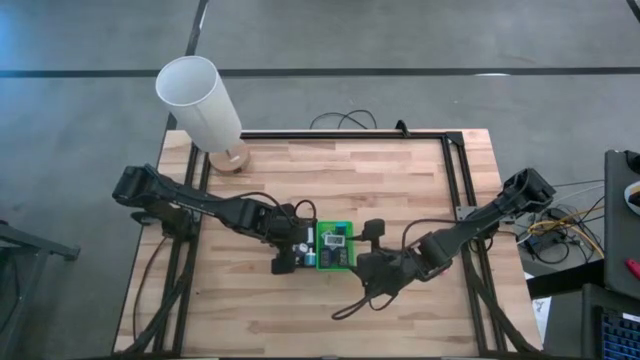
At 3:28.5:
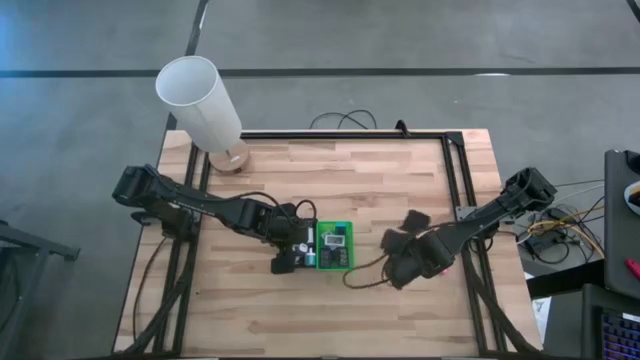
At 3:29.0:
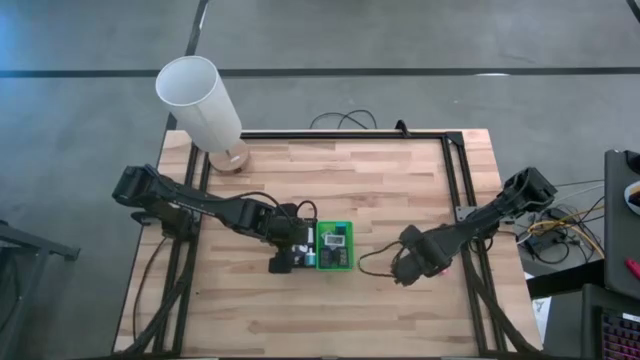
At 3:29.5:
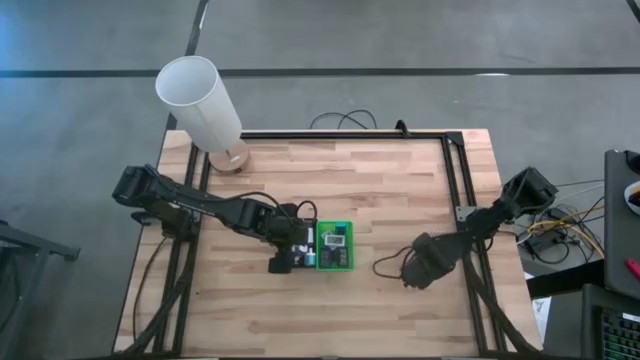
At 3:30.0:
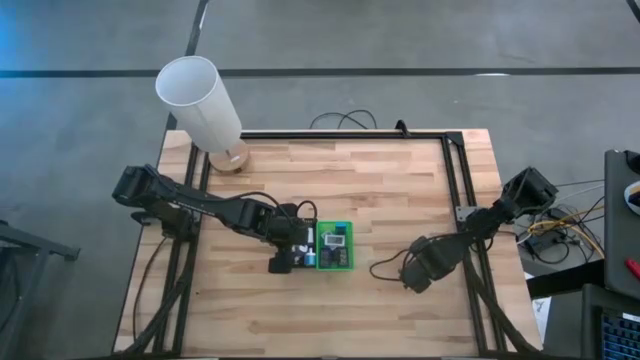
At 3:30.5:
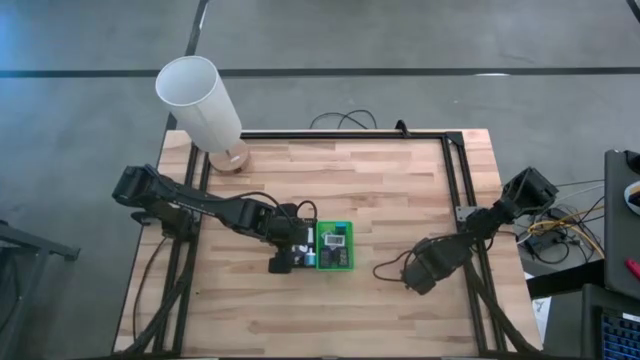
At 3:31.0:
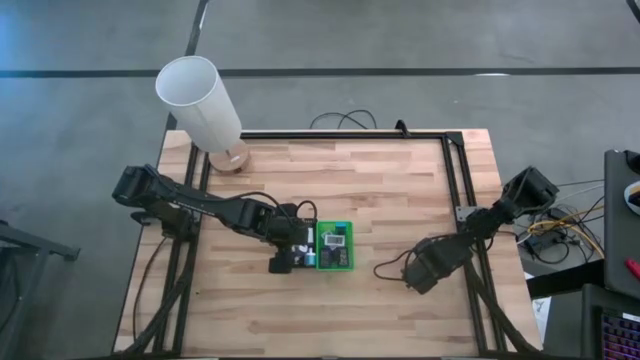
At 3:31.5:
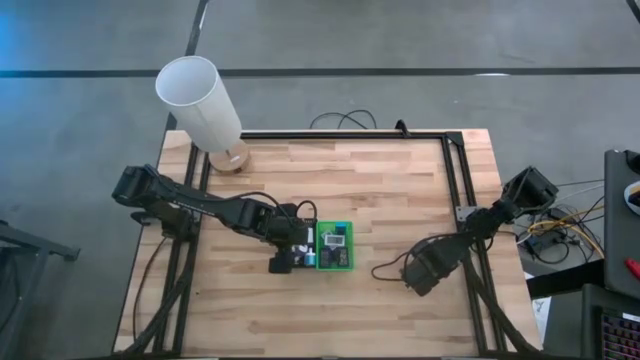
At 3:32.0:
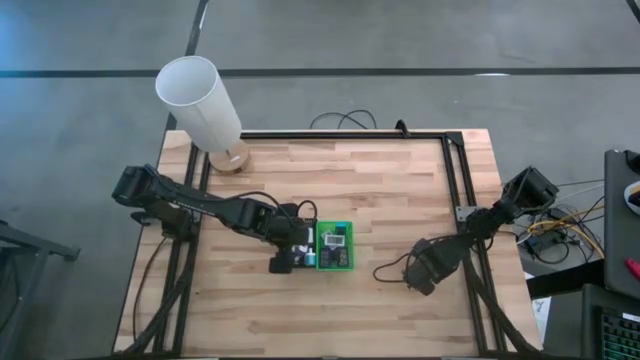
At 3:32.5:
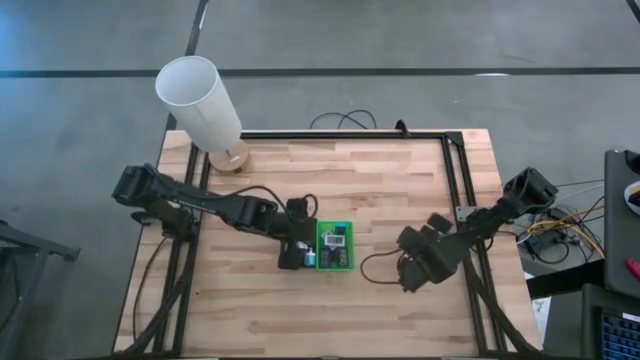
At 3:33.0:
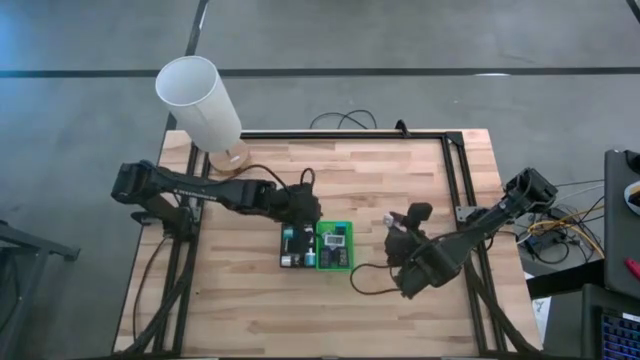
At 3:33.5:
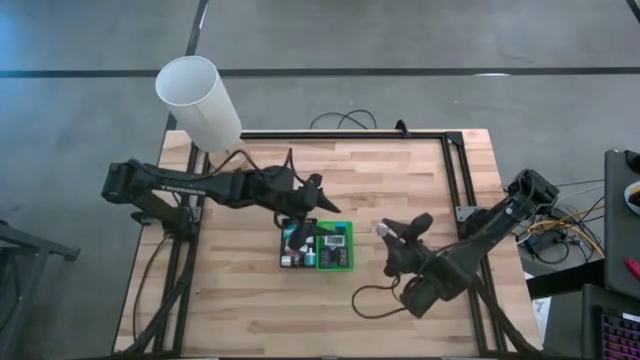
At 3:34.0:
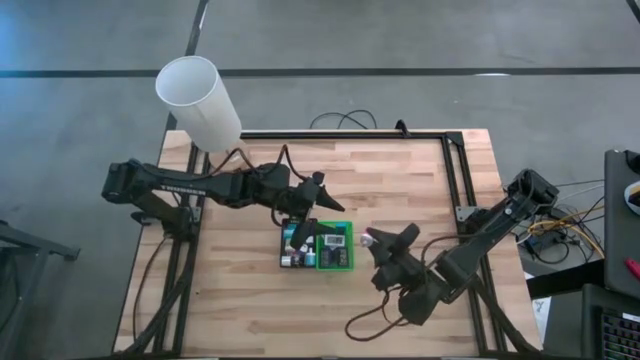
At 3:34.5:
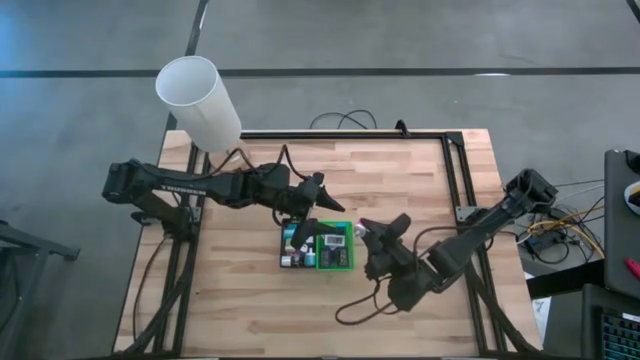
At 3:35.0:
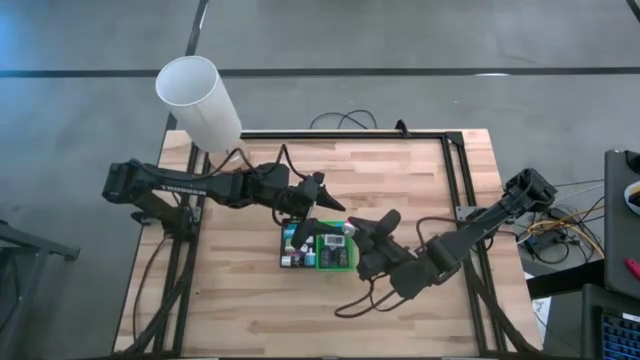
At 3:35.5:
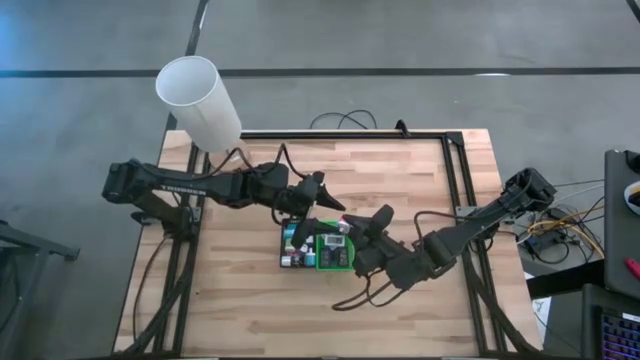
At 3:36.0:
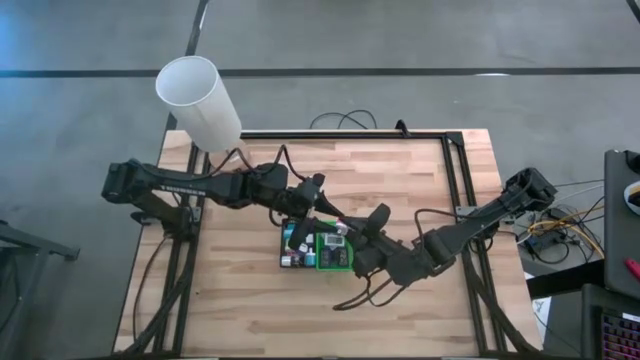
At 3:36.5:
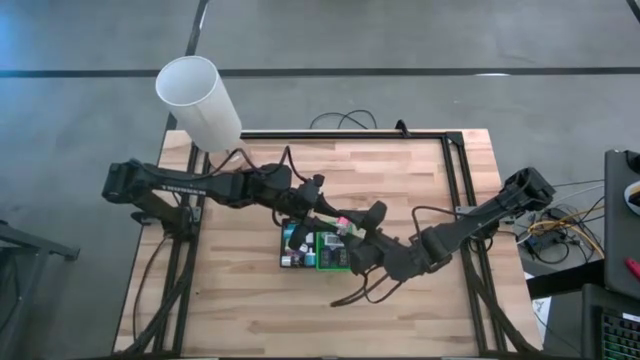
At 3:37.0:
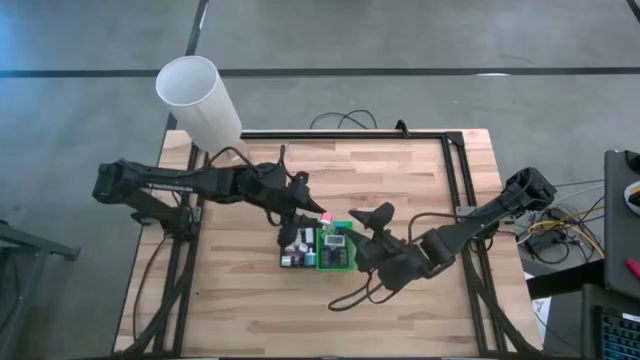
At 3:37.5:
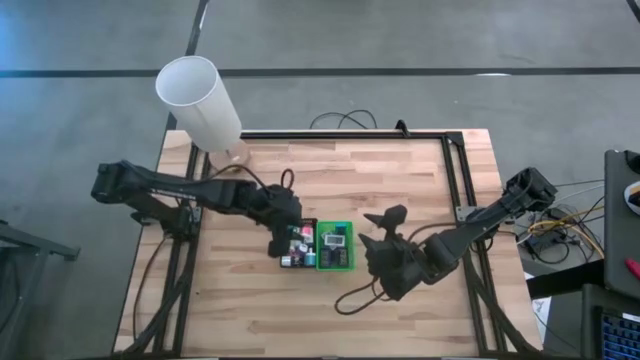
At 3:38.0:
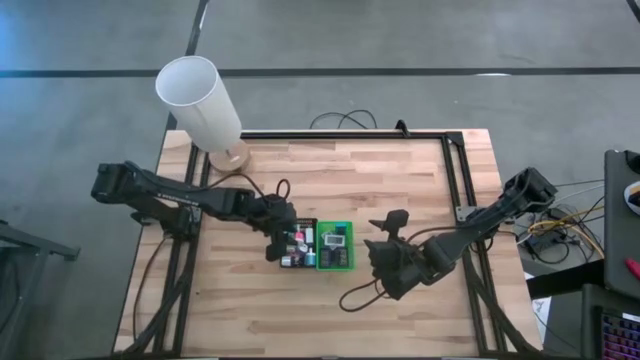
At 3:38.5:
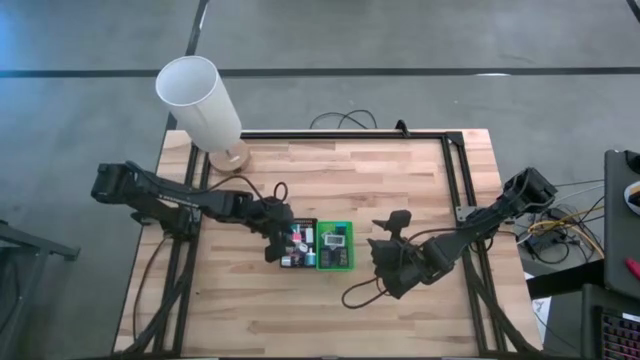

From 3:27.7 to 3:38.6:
Task: Pick & Place Office items
Put the red white charger adapter into the black bin

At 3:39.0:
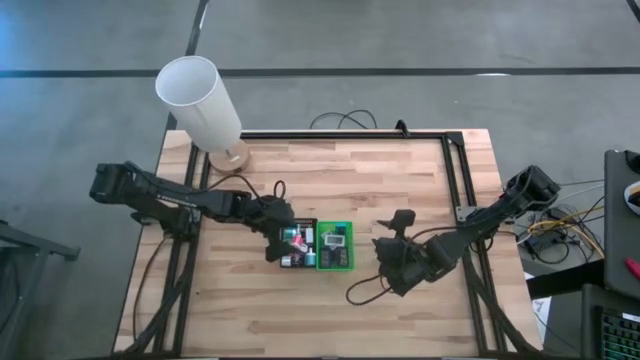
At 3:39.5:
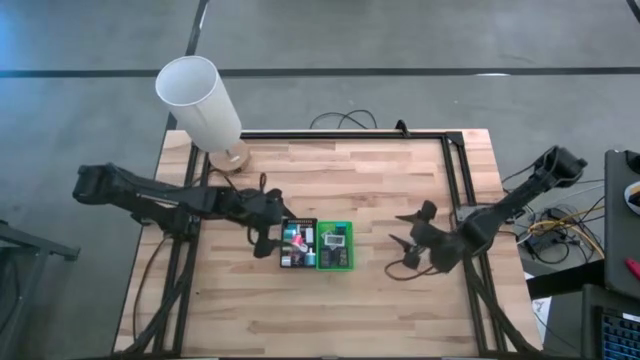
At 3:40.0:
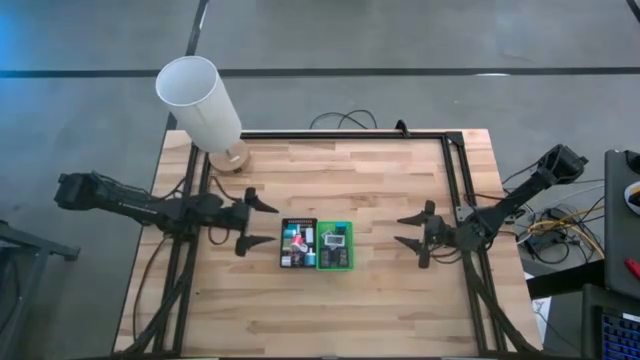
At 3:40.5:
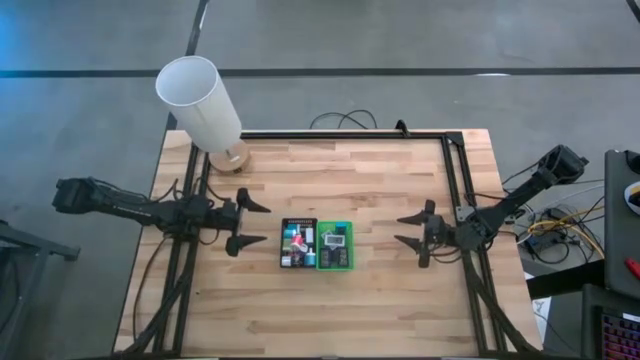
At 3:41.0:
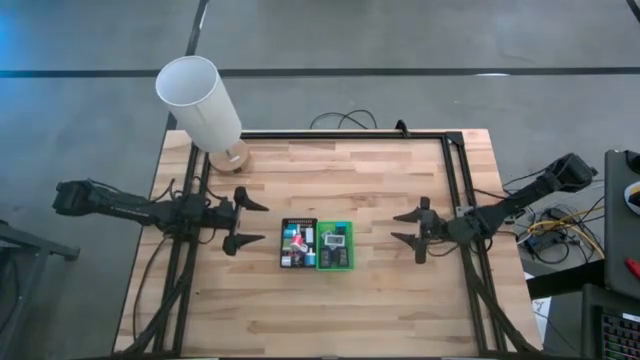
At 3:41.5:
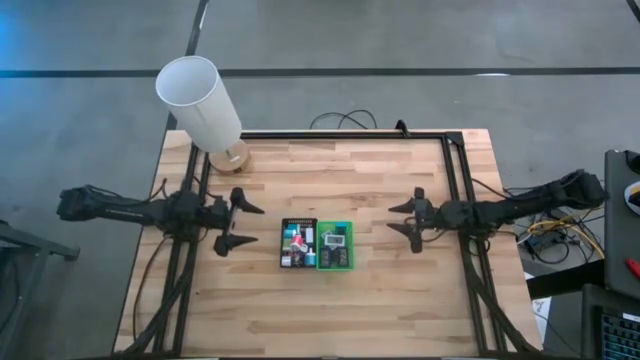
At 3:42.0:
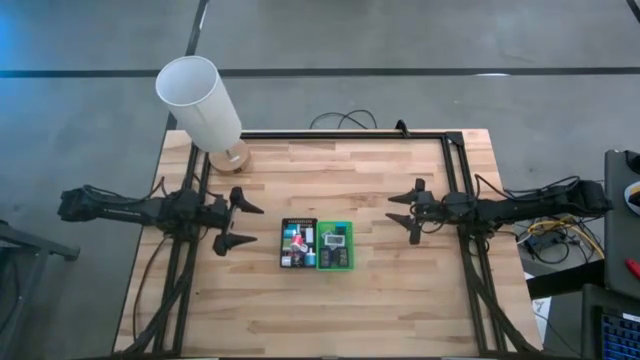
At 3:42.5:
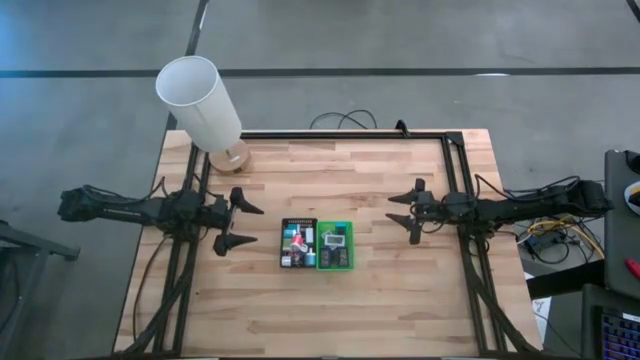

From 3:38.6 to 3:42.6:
Return to Home Position

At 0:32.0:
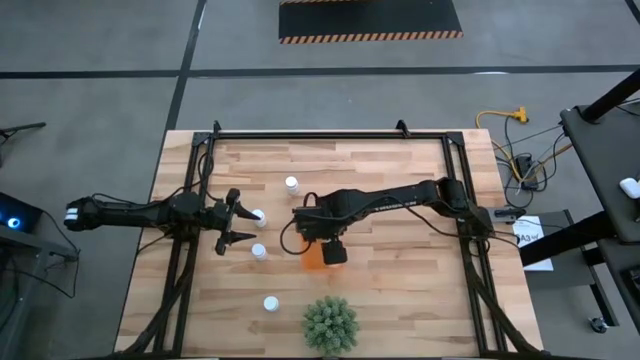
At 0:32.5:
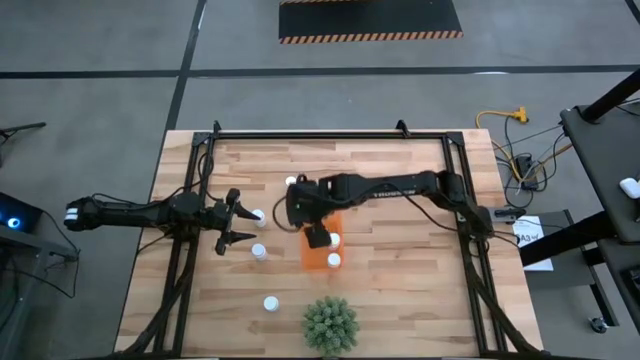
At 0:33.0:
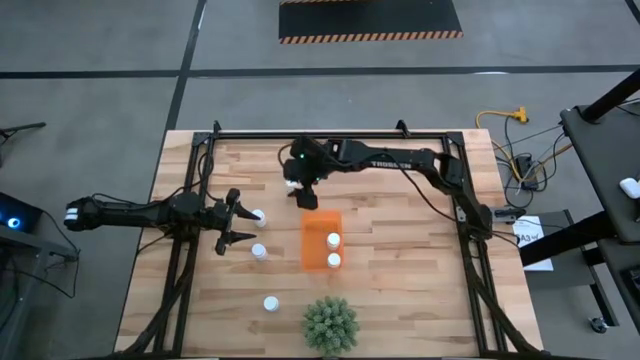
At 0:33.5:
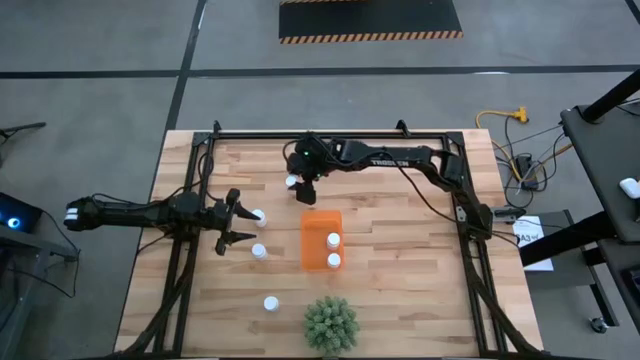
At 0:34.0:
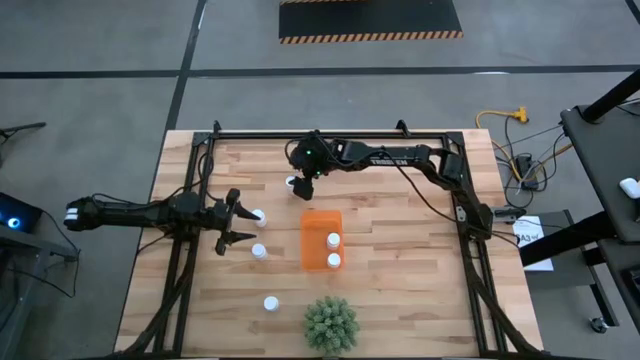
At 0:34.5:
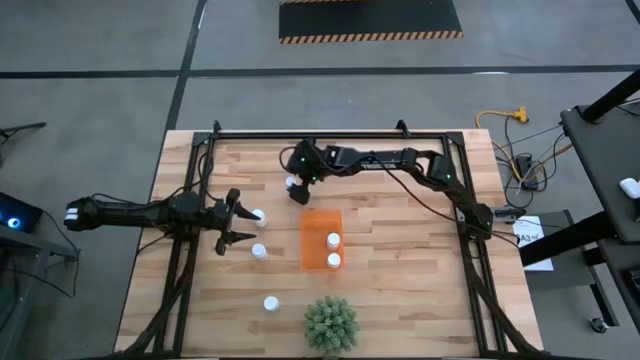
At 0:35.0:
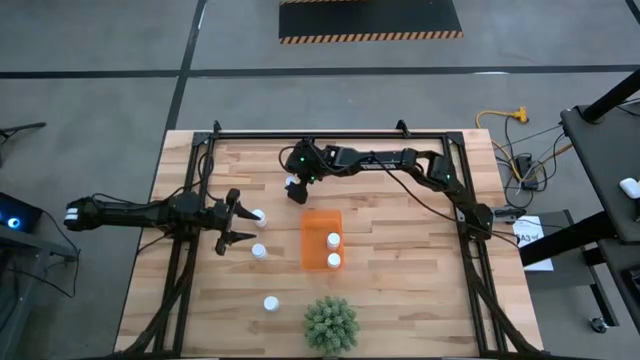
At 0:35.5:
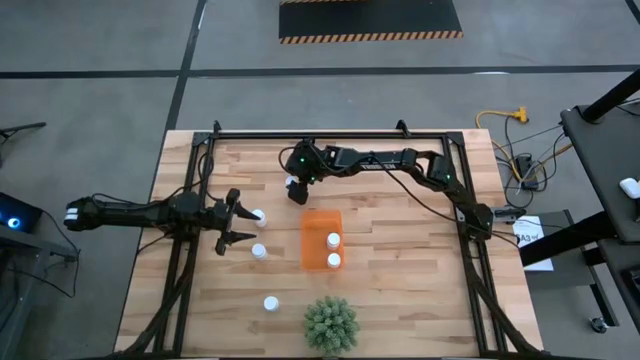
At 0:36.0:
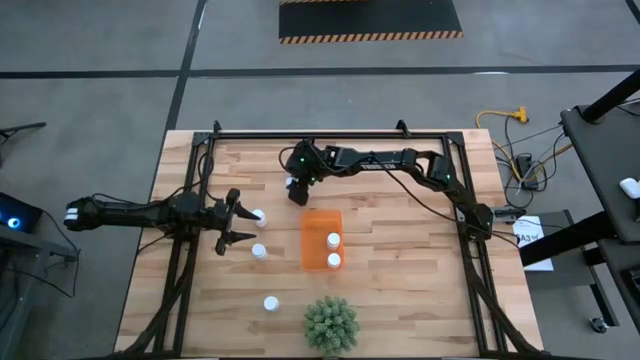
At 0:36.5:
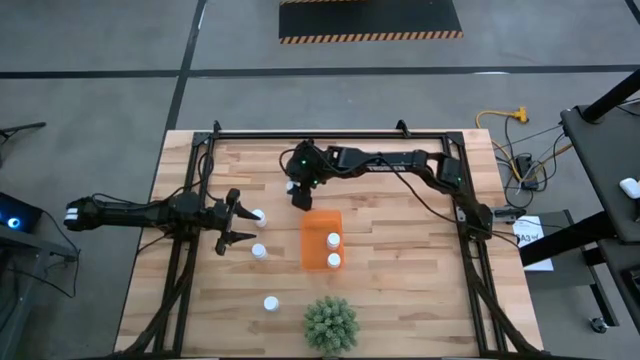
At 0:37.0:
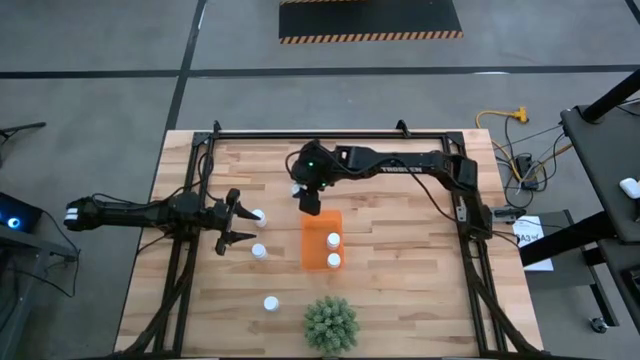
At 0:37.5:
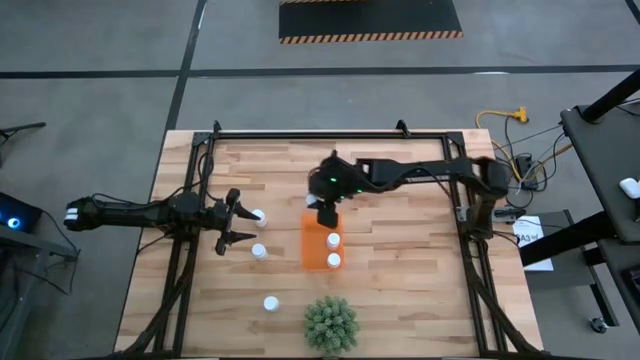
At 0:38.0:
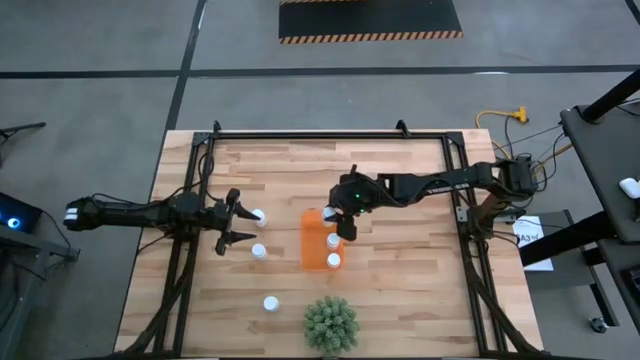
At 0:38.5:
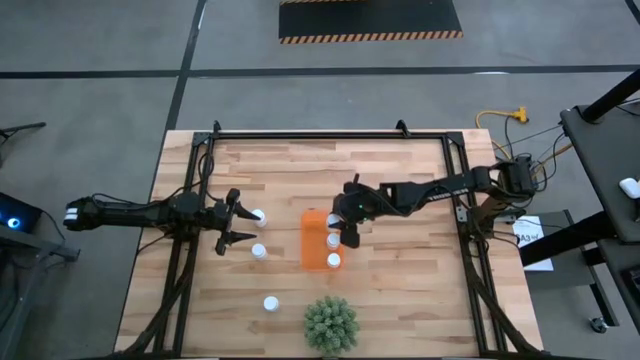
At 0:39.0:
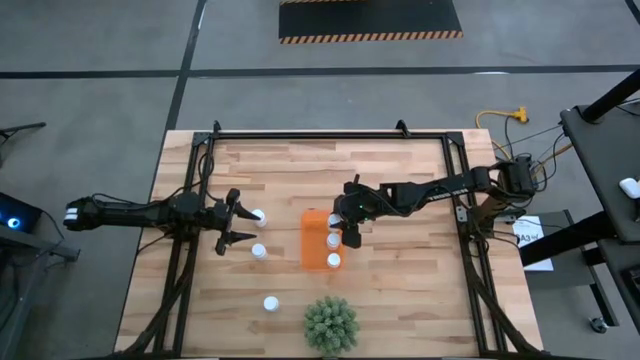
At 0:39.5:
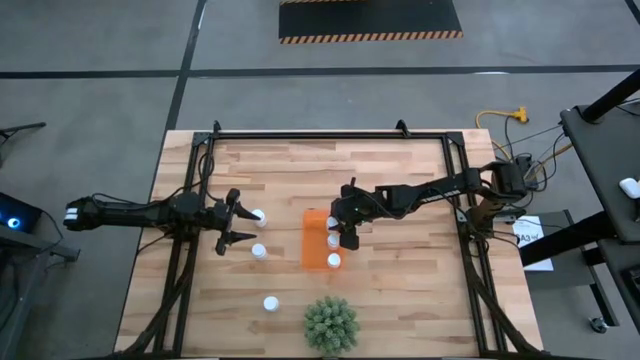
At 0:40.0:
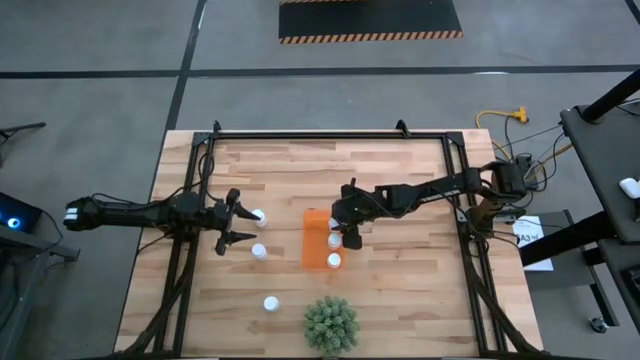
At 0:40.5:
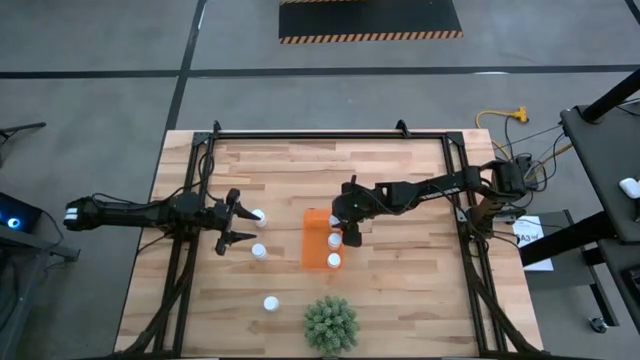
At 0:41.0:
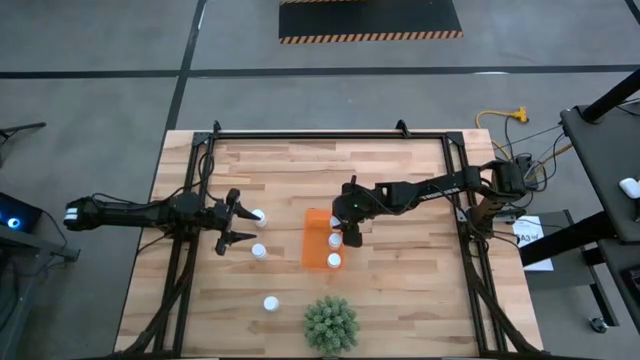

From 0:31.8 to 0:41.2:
Task: Pick and place pill bottles into a basket
Put the white pill bottle into the orange bin
